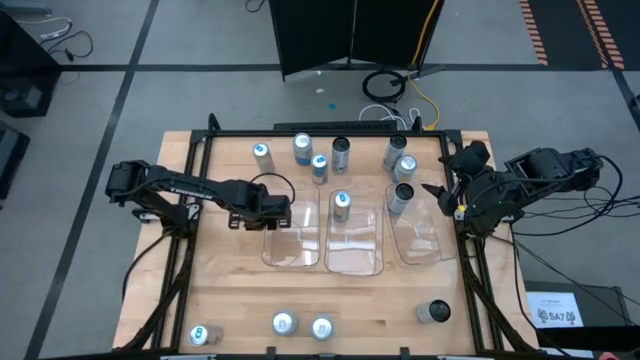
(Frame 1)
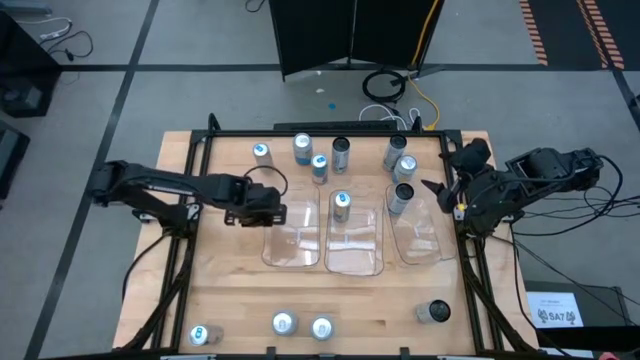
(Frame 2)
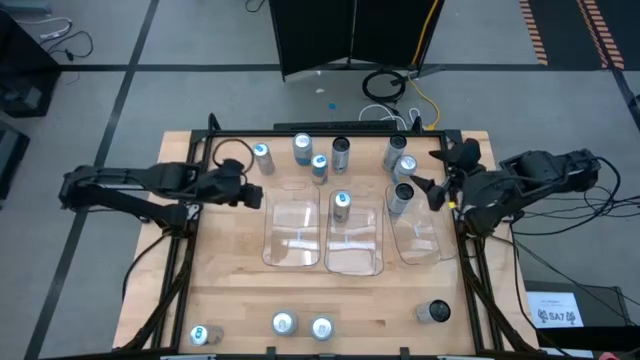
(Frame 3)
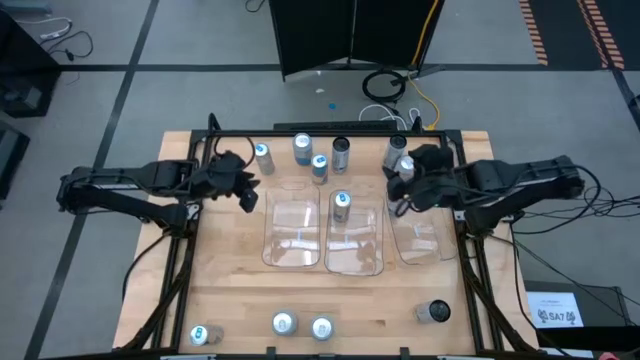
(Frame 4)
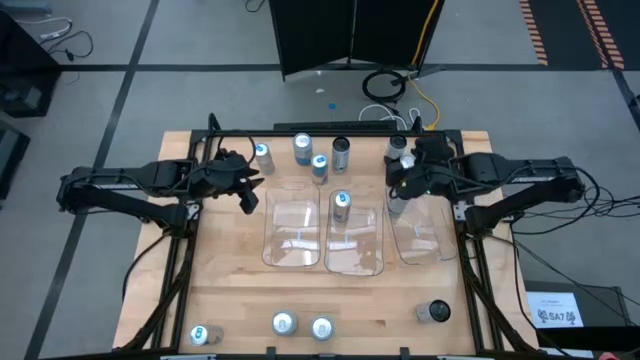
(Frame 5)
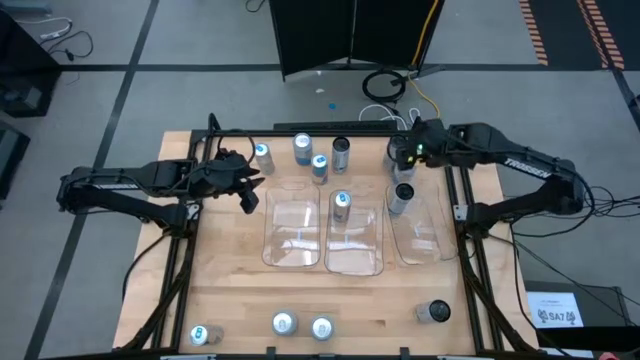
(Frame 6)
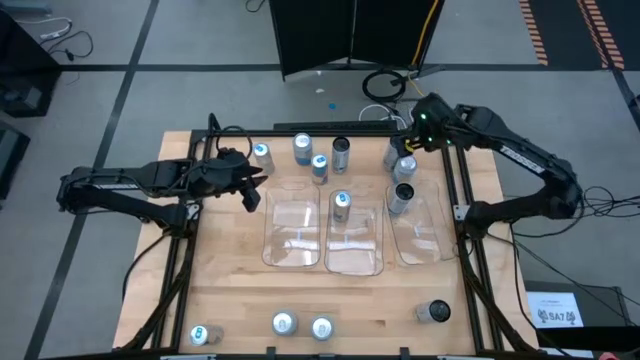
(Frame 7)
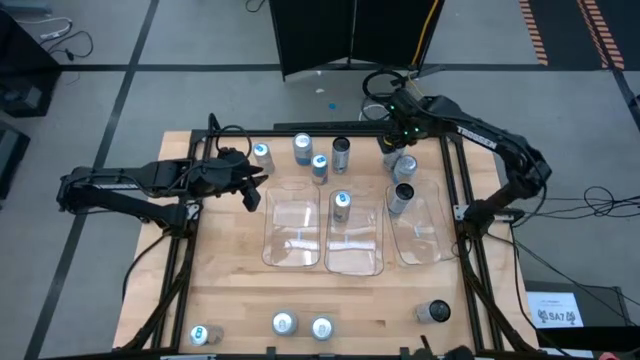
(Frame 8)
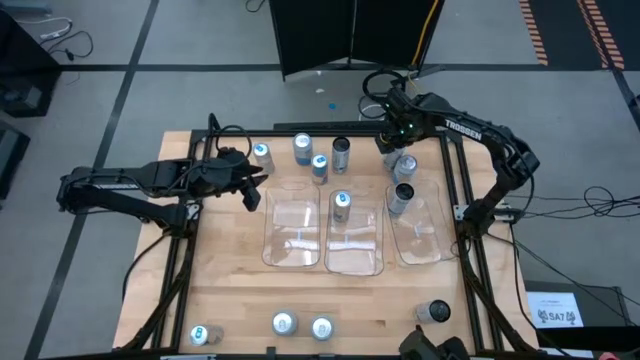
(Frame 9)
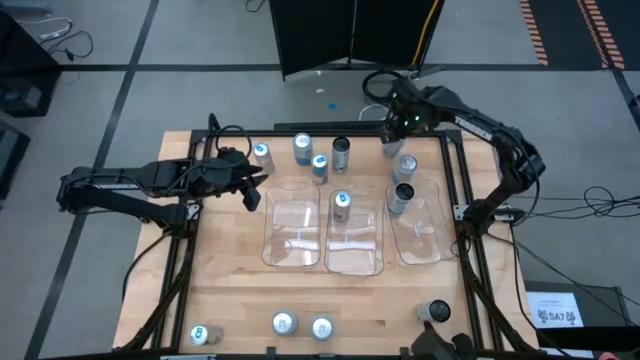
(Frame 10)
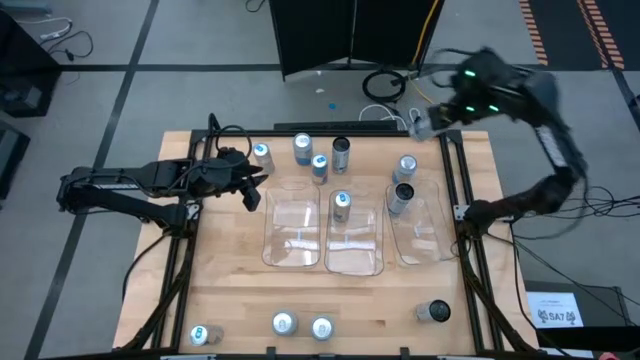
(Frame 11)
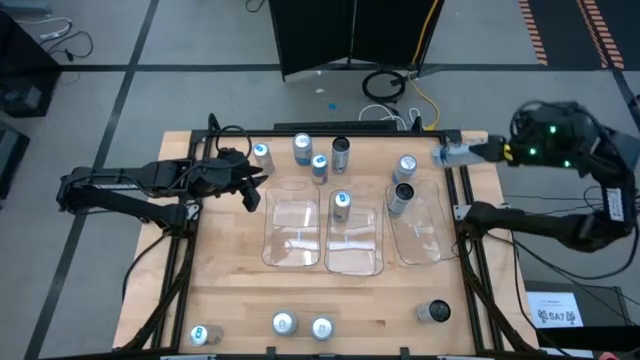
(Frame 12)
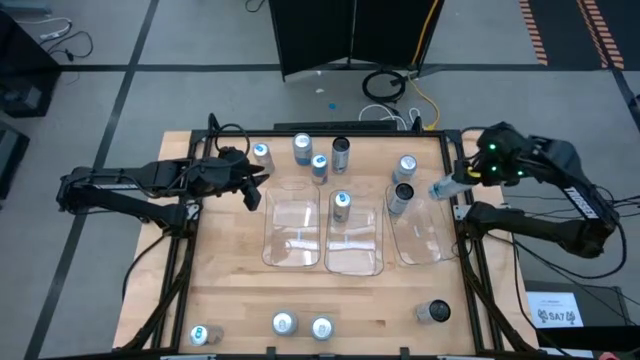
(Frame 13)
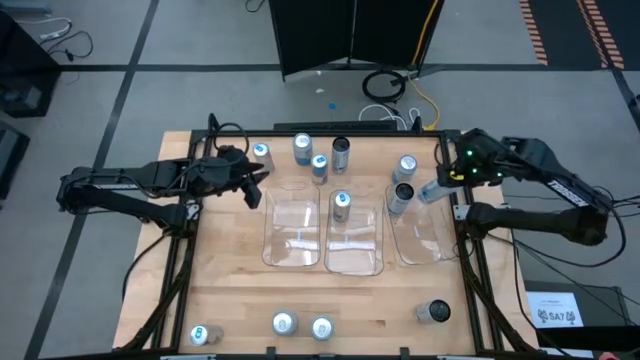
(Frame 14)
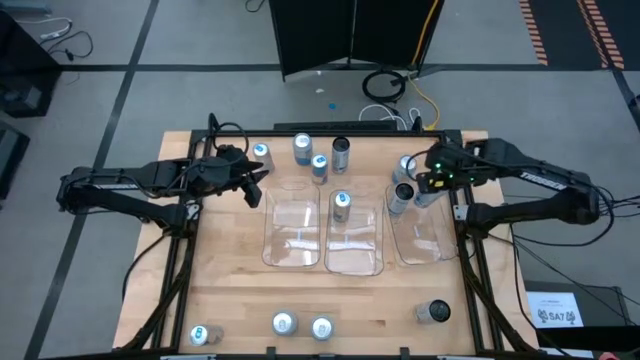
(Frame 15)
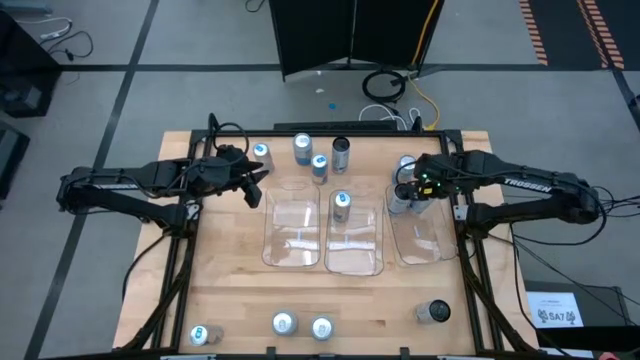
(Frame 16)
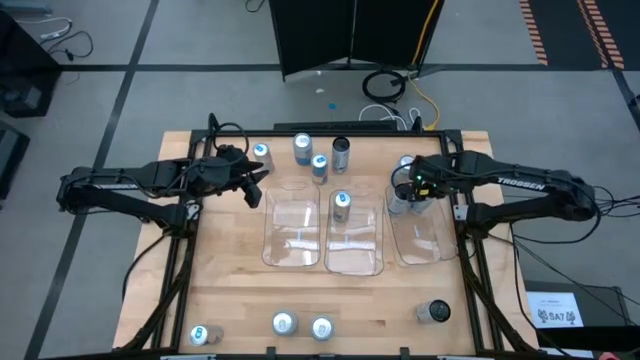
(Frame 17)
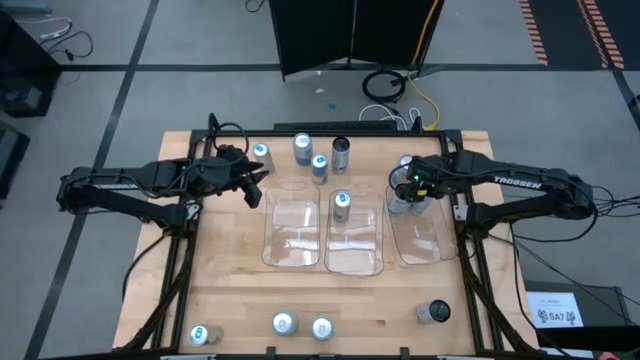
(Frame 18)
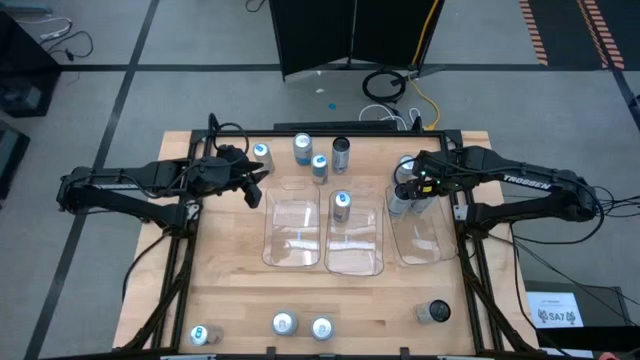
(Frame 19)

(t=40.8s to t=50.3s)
Task: Sort soda cans
Put the top right white-blue soda can into the right transparent bin

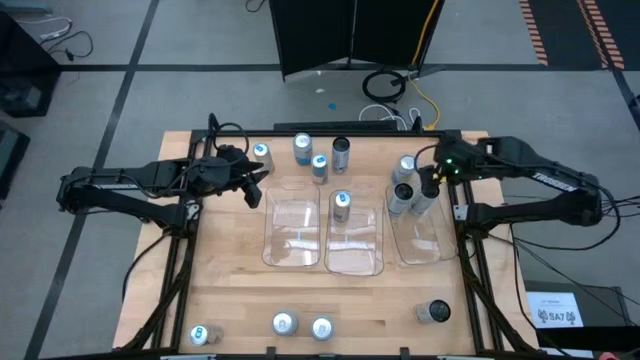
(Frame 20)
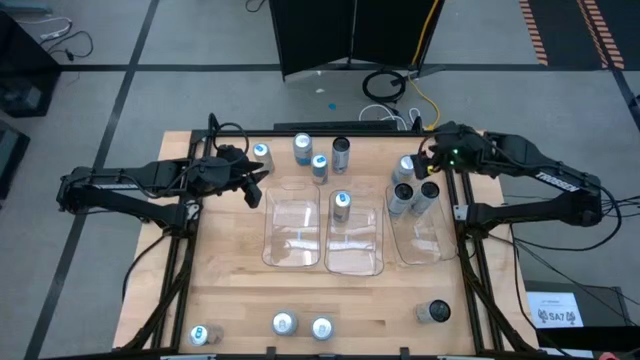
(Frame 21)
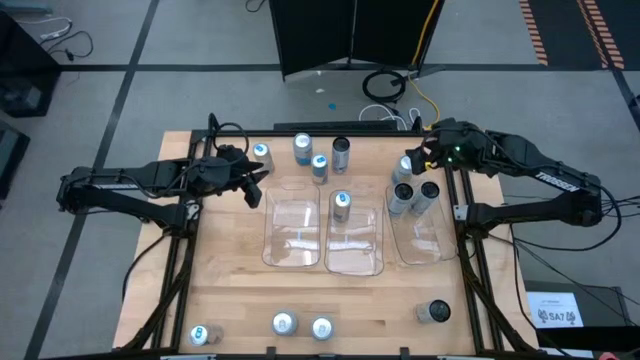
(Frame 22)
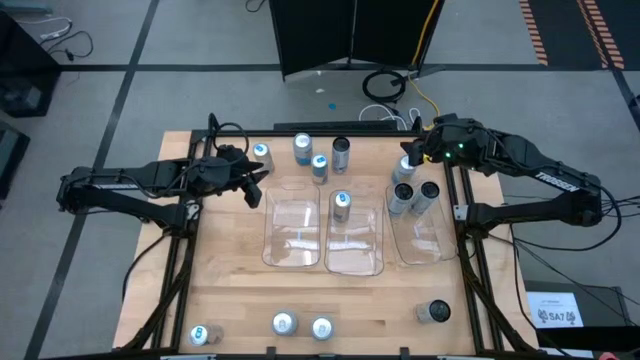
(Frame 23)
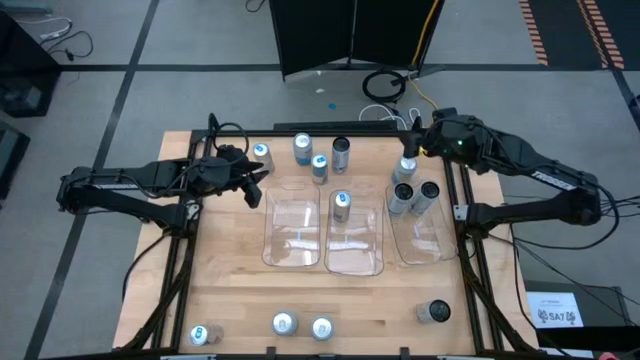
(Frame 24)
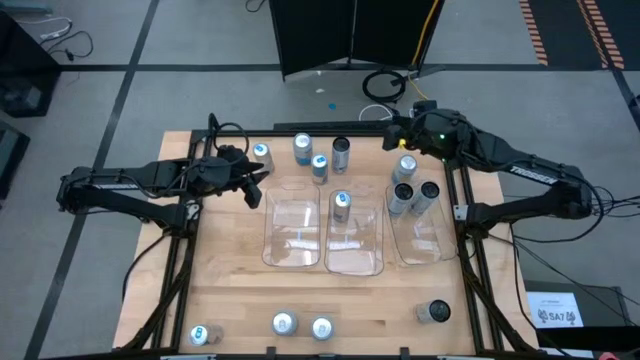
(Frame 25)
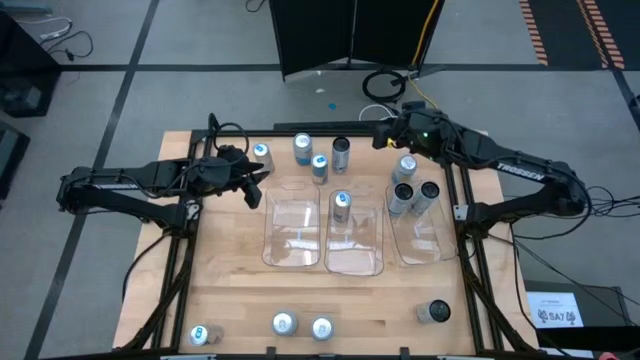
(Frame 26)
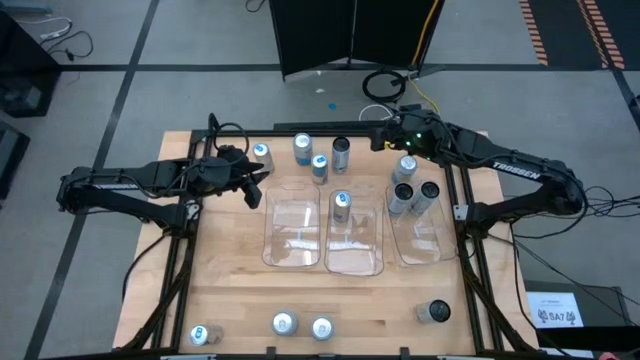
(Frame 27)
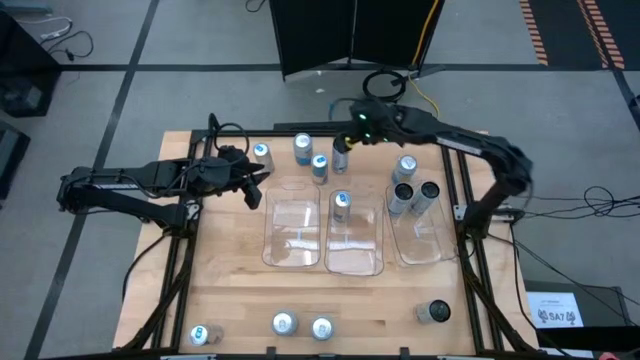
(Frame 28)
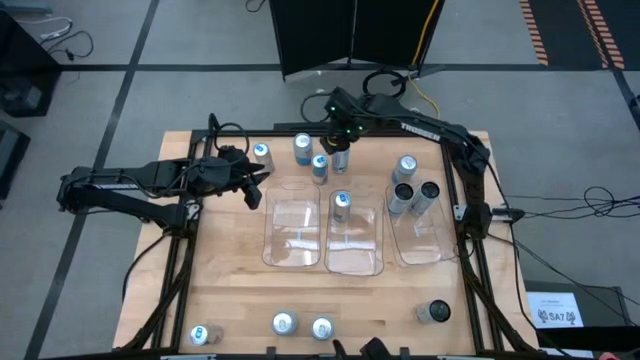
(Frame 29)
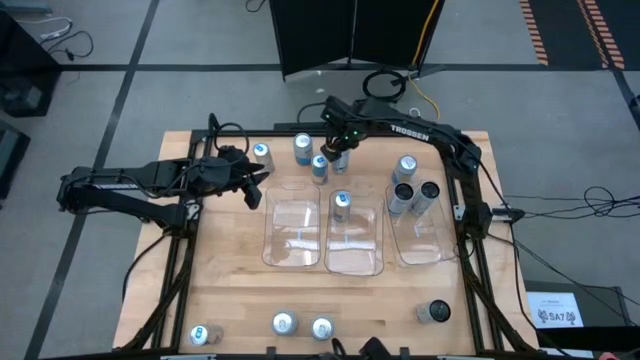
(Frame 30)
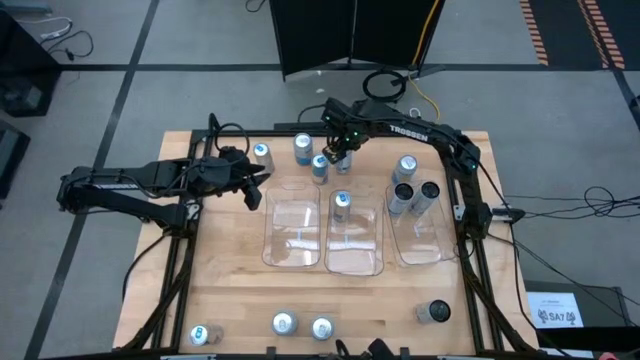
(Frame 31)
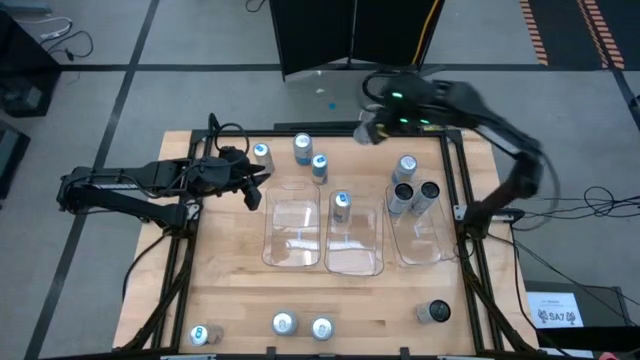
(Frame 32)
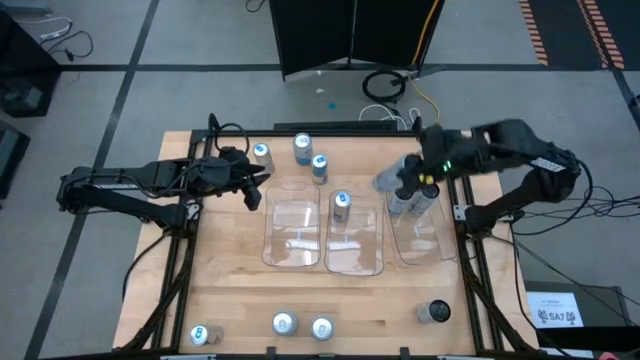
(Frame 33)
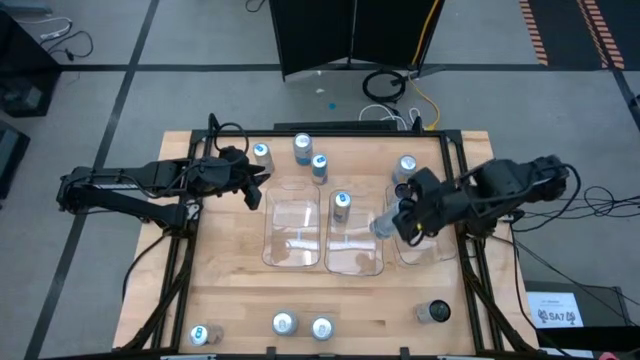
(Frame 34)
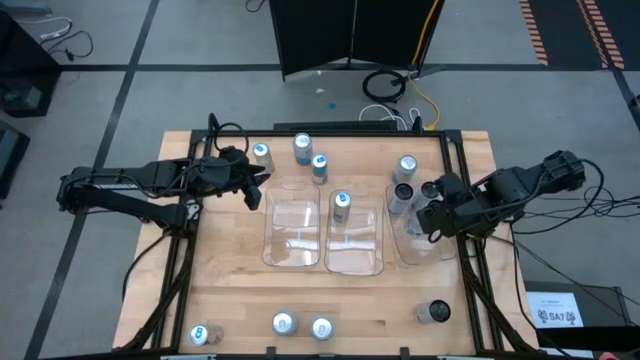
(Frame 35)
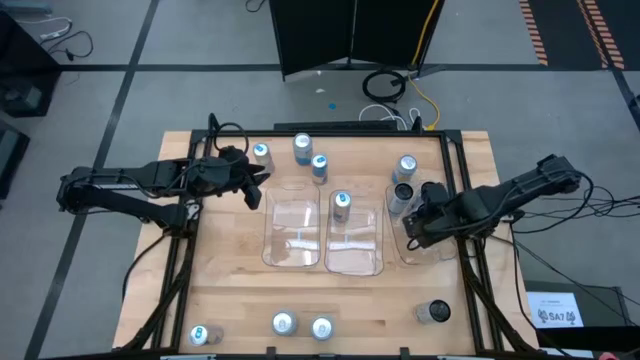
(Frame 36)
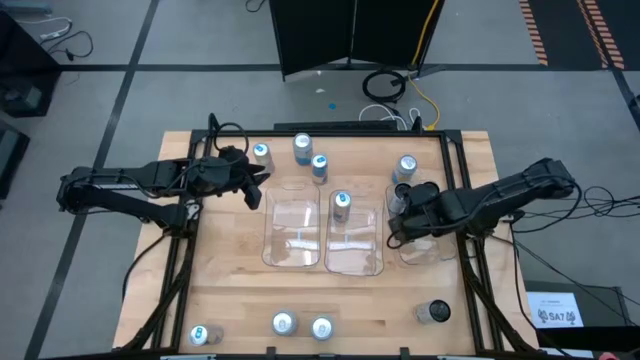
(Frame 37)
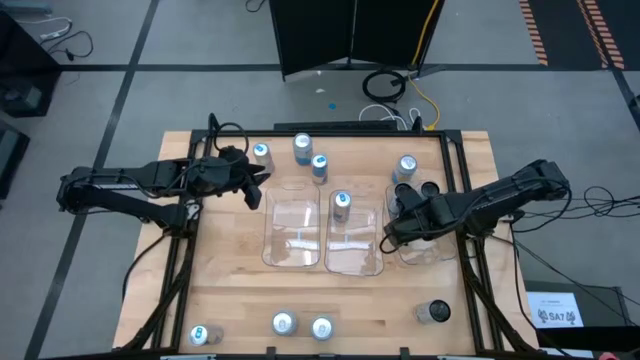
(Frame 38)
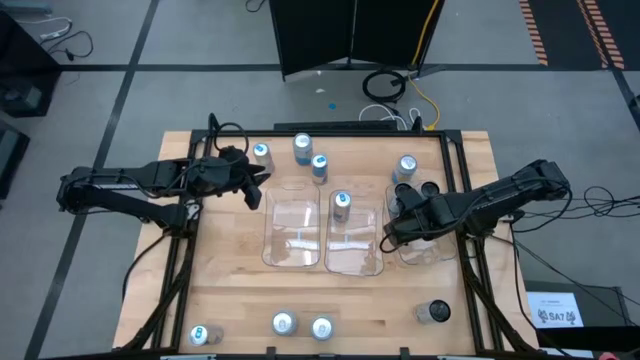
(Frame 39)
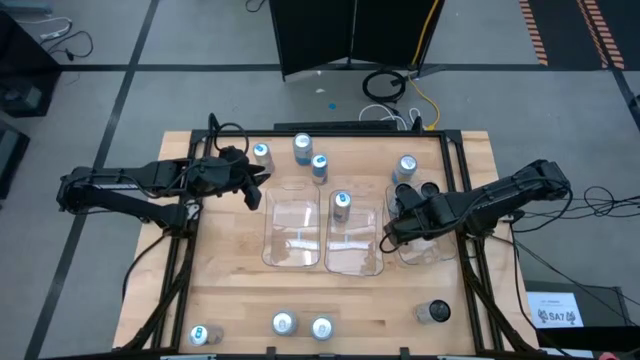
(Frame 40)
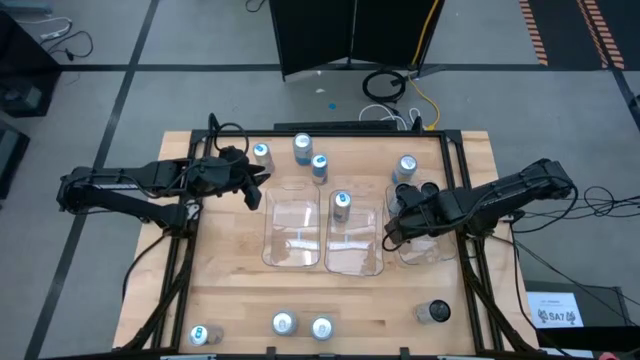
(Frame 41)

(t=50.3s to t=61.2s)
Put the top white-blue soda can into the right transparent bin

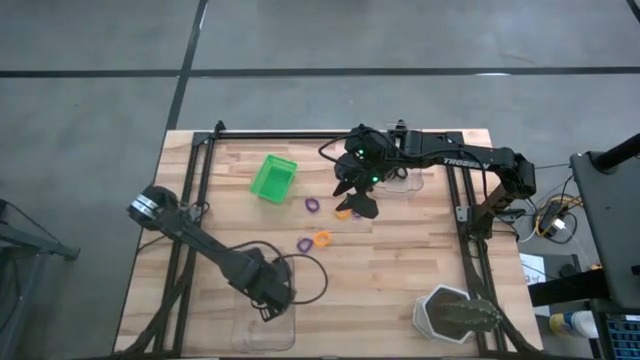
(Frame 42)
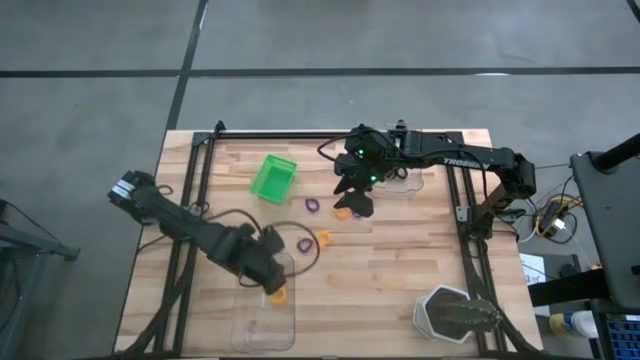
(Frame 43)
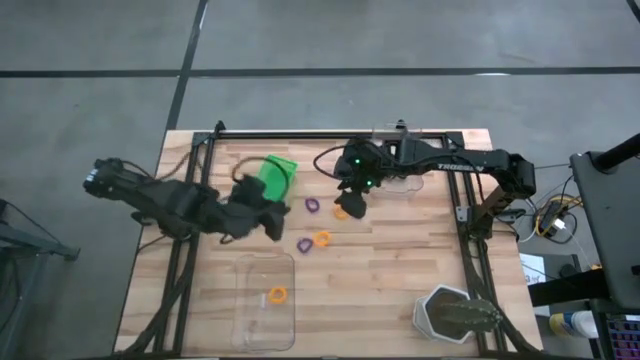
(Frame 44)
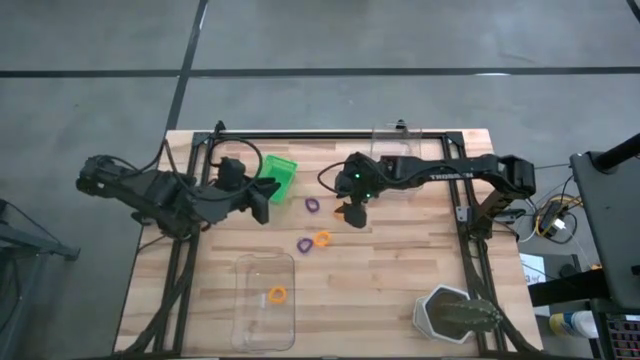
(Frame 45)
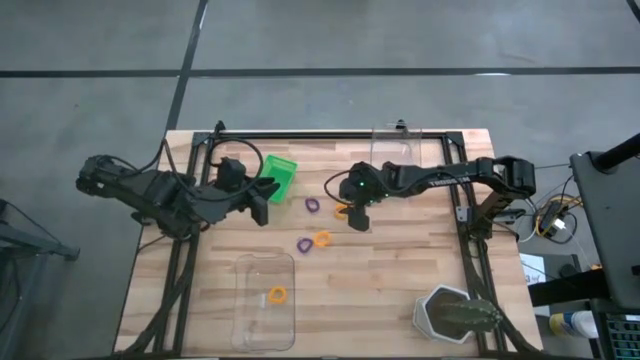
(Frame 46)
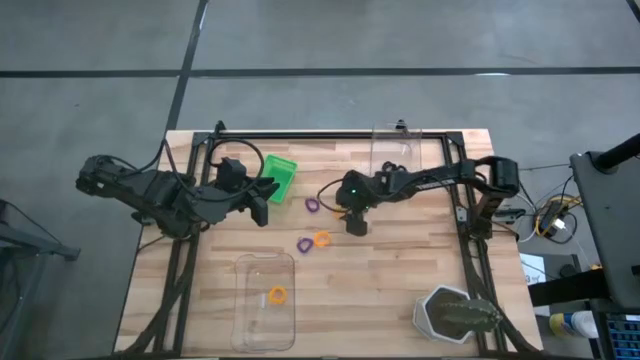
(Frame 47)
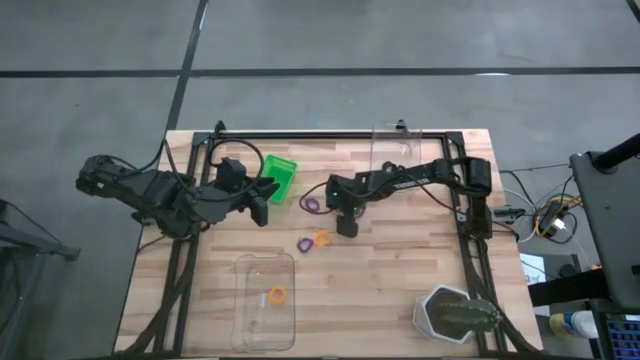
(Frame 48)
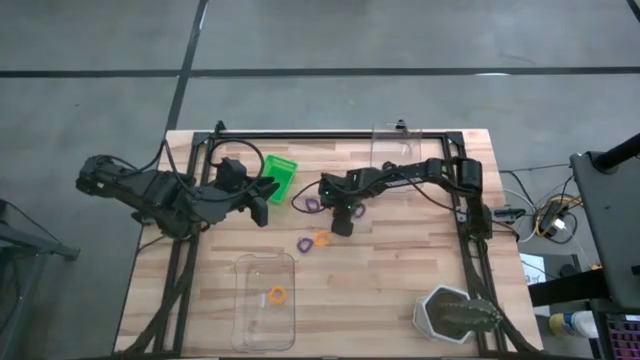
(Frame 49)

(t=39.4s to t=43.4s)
Task: Sort spring keychains
Put the top yellow spring keychain into the bottom transparent bin
